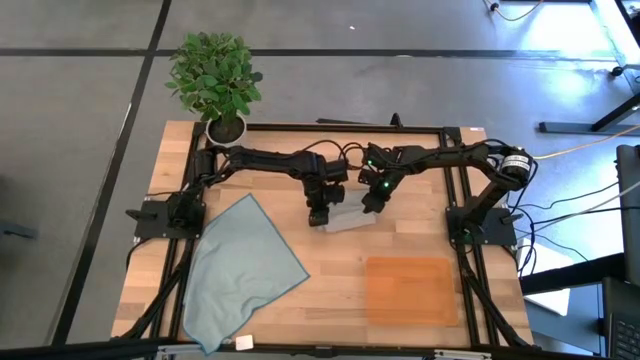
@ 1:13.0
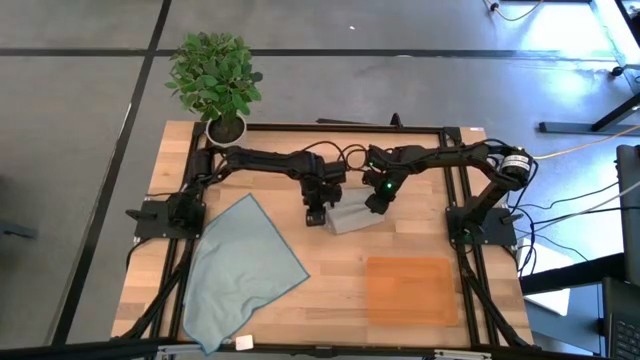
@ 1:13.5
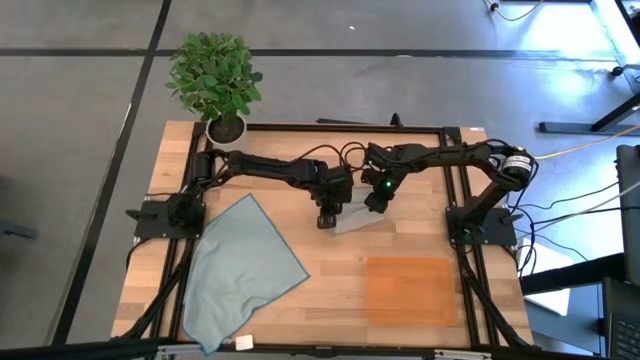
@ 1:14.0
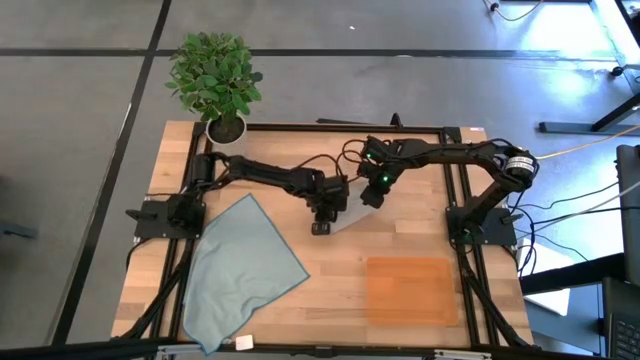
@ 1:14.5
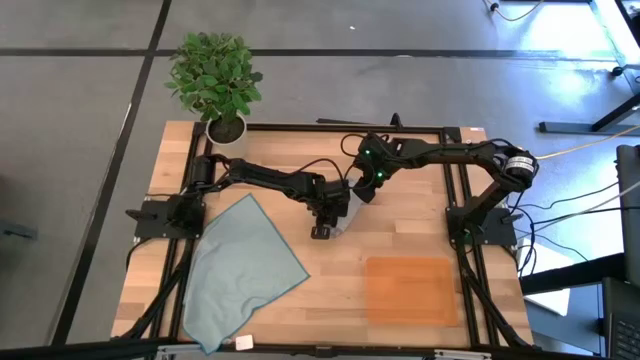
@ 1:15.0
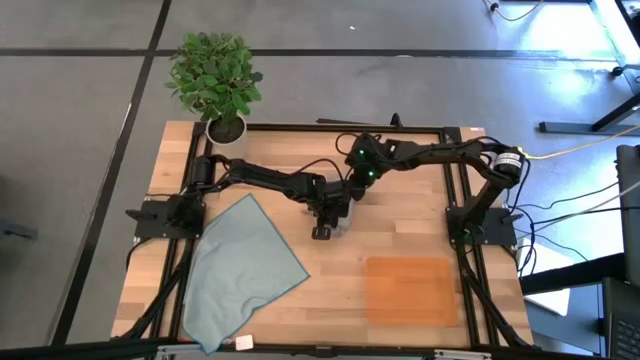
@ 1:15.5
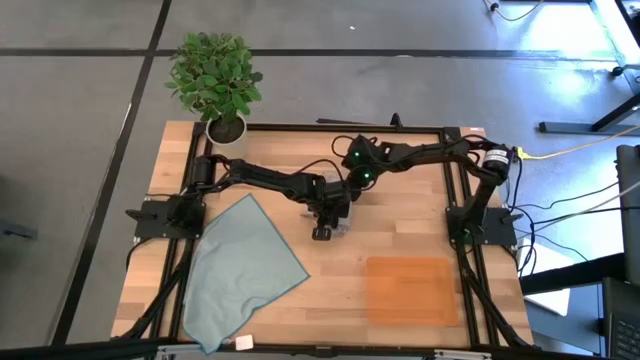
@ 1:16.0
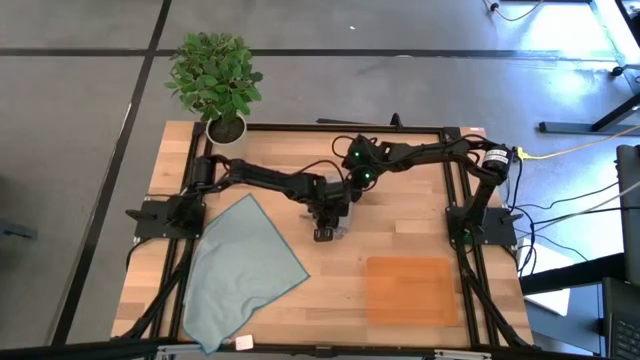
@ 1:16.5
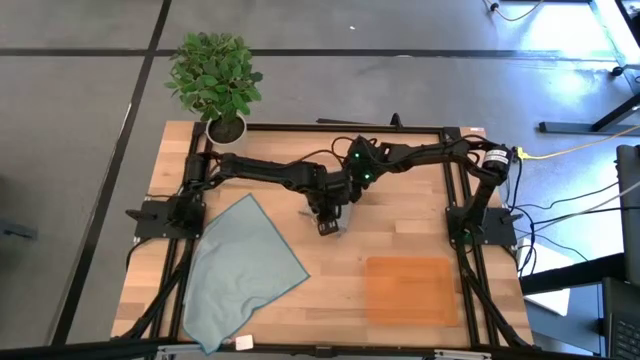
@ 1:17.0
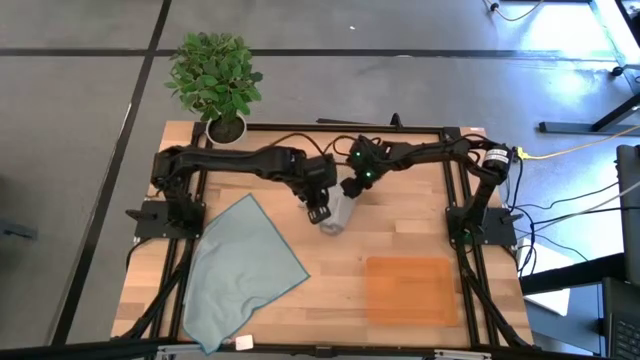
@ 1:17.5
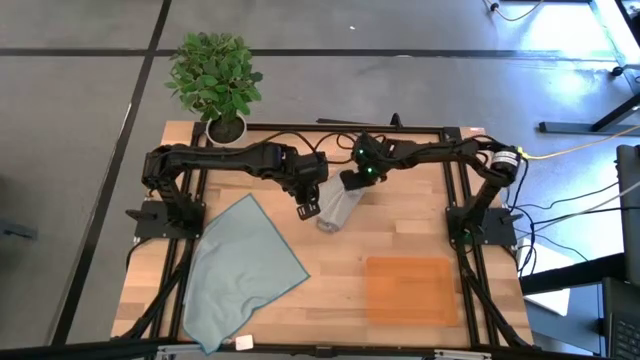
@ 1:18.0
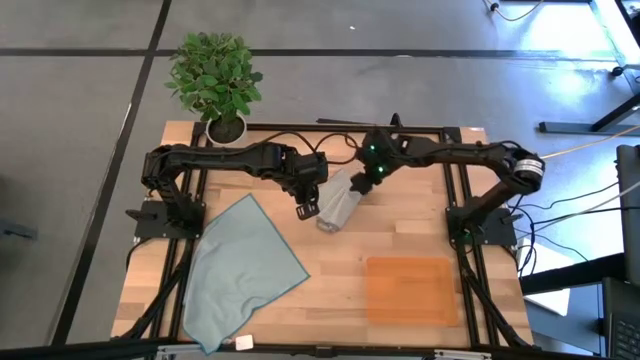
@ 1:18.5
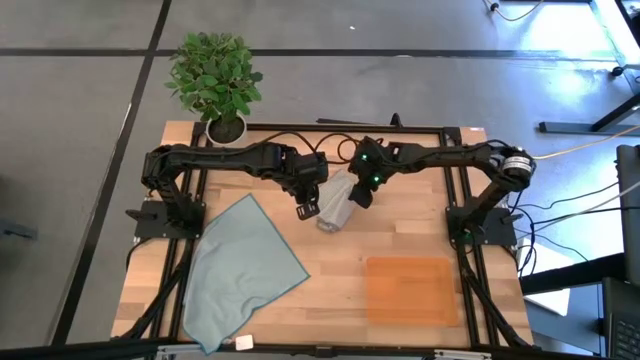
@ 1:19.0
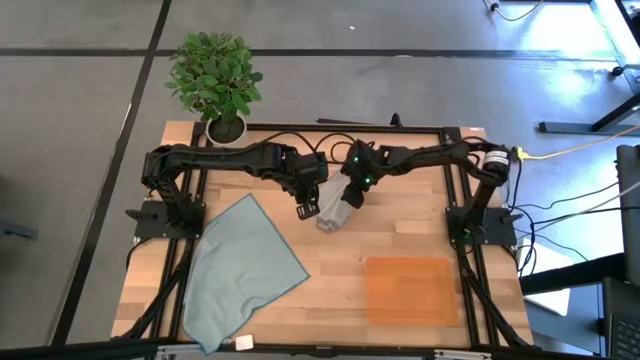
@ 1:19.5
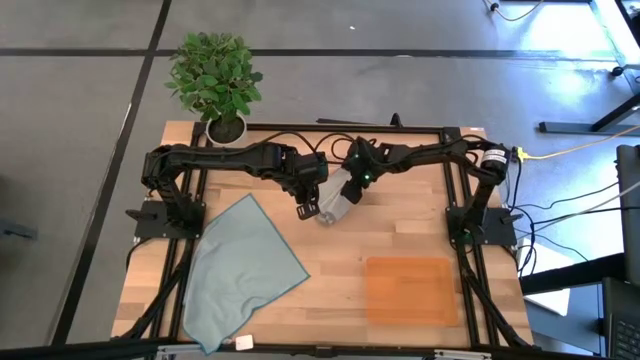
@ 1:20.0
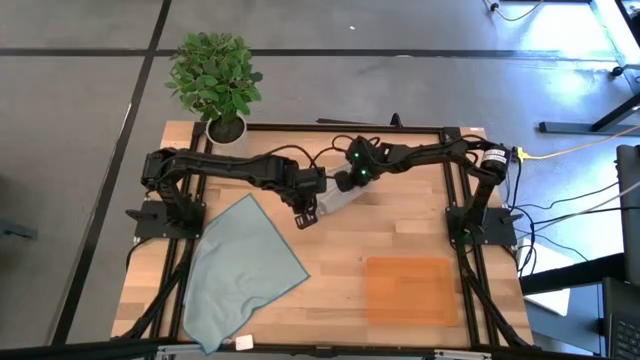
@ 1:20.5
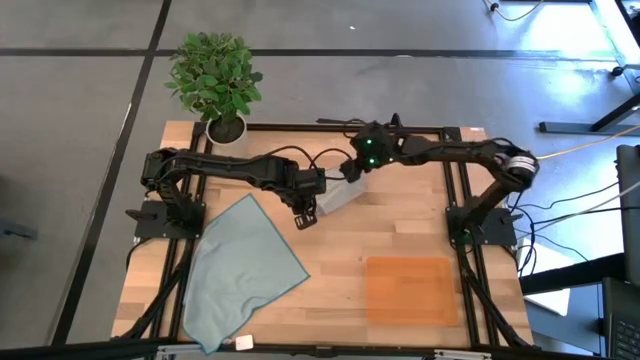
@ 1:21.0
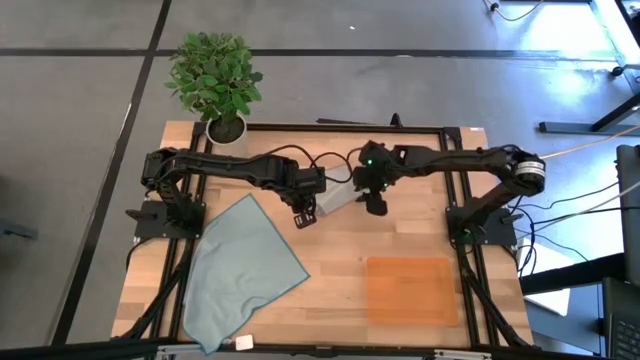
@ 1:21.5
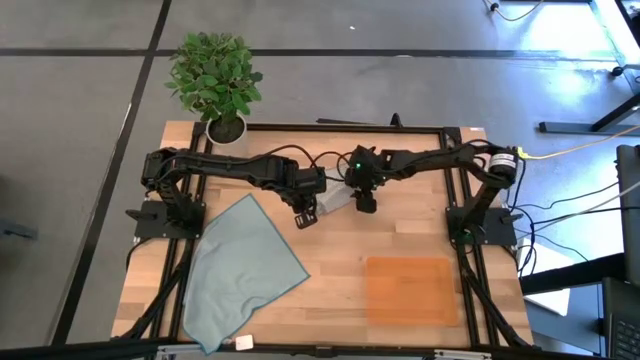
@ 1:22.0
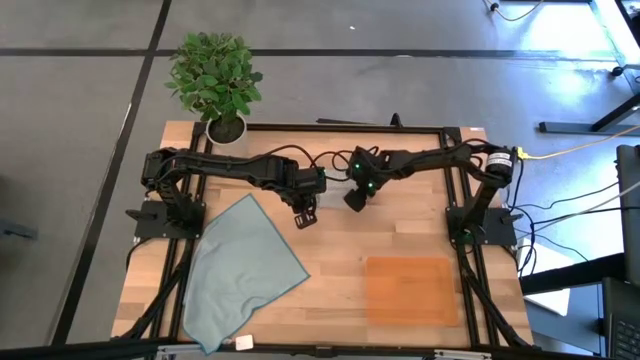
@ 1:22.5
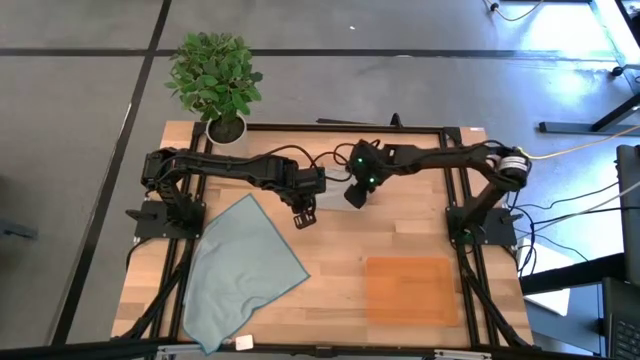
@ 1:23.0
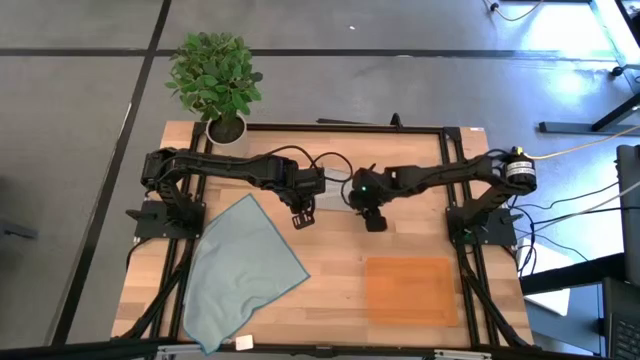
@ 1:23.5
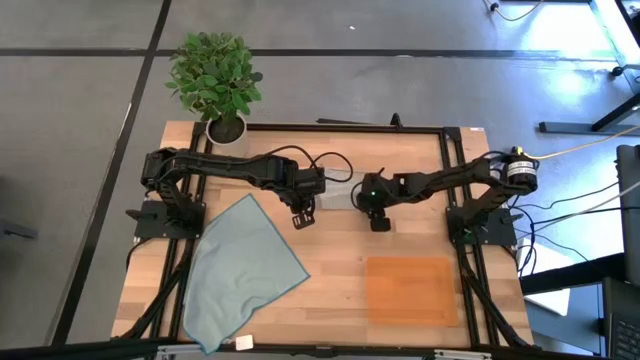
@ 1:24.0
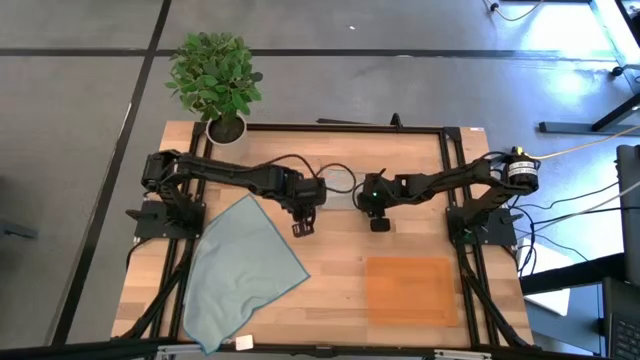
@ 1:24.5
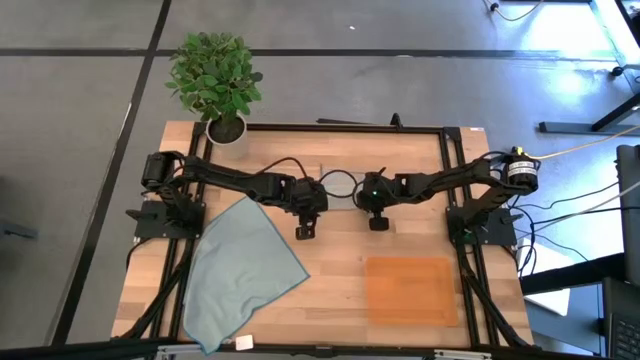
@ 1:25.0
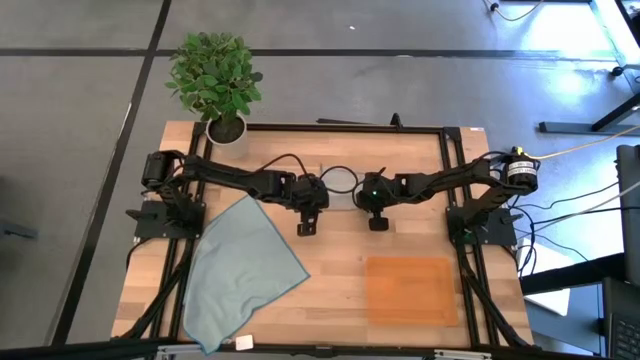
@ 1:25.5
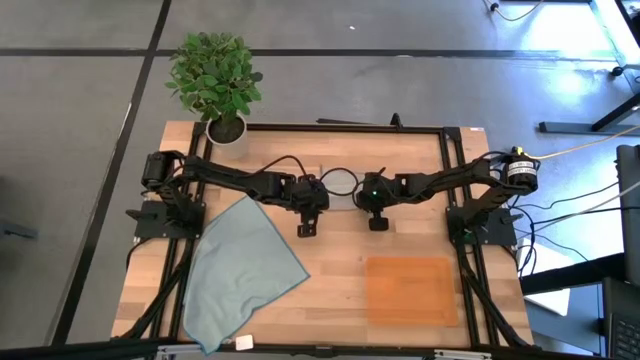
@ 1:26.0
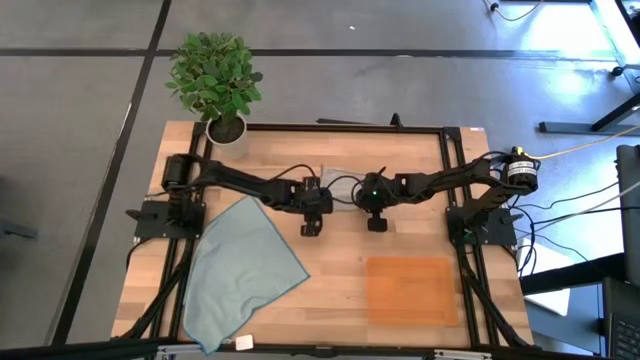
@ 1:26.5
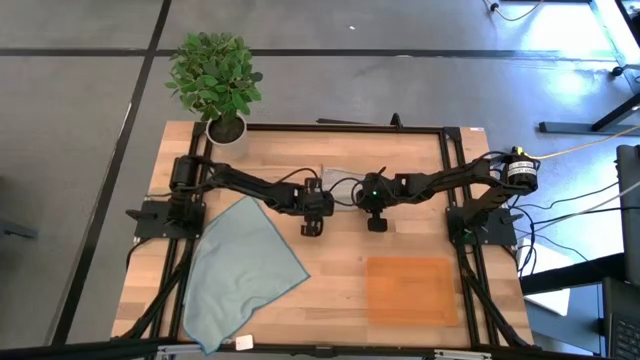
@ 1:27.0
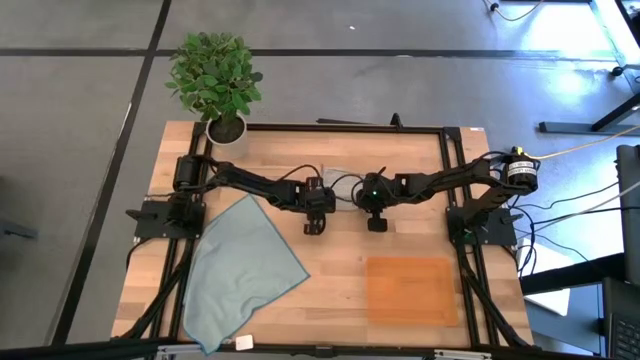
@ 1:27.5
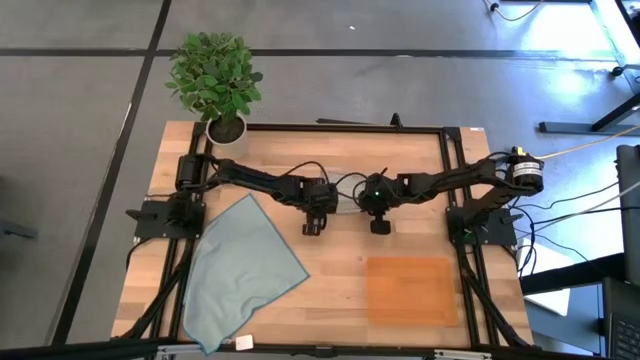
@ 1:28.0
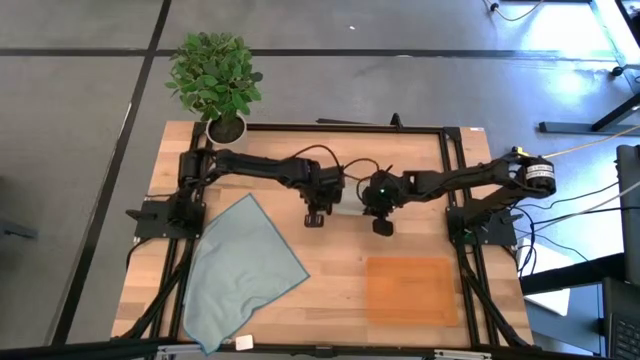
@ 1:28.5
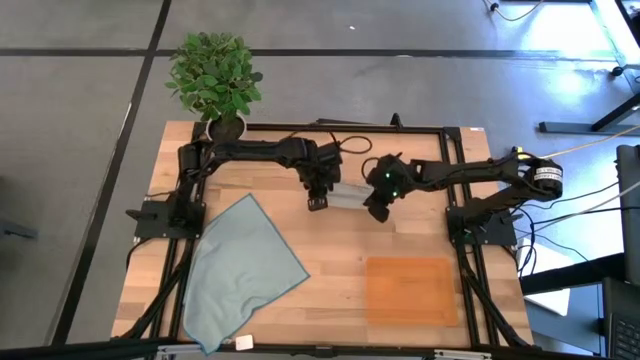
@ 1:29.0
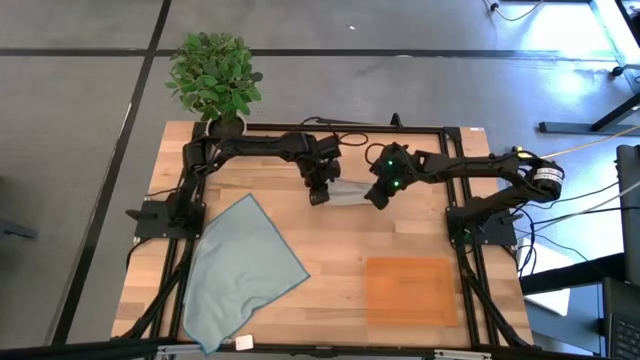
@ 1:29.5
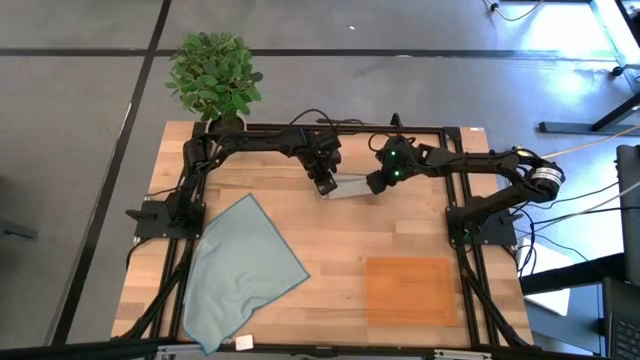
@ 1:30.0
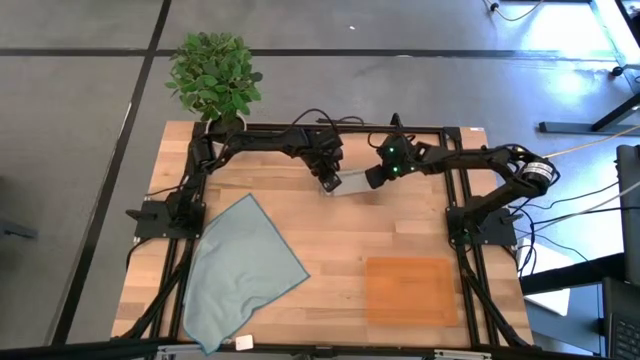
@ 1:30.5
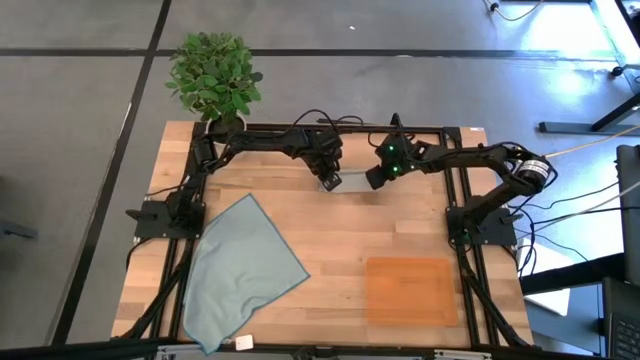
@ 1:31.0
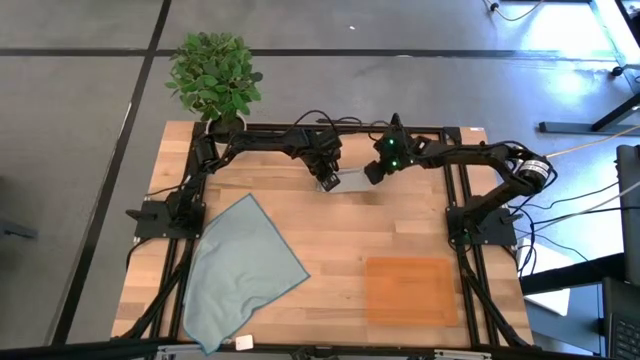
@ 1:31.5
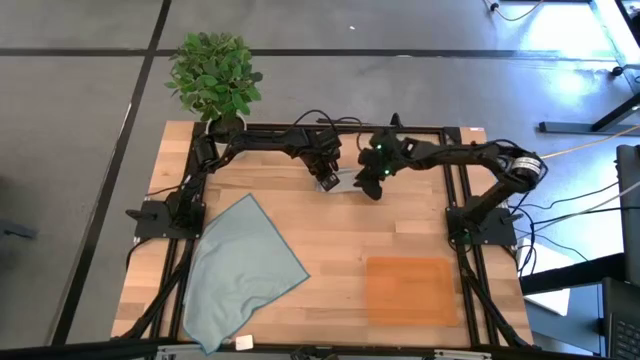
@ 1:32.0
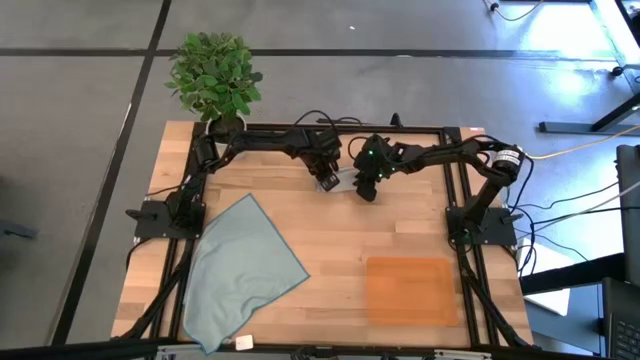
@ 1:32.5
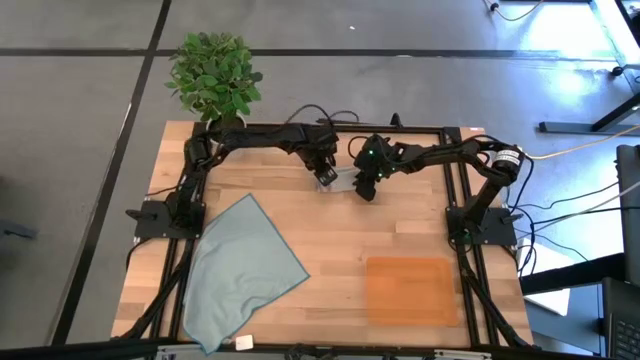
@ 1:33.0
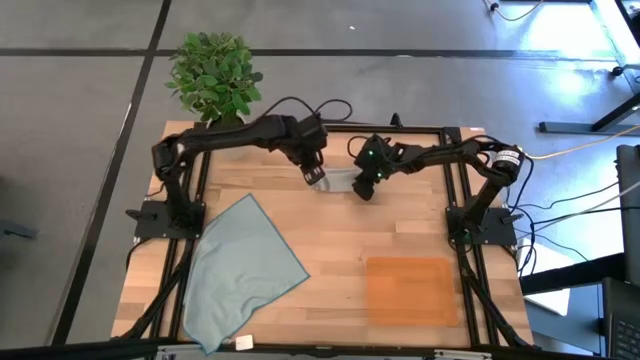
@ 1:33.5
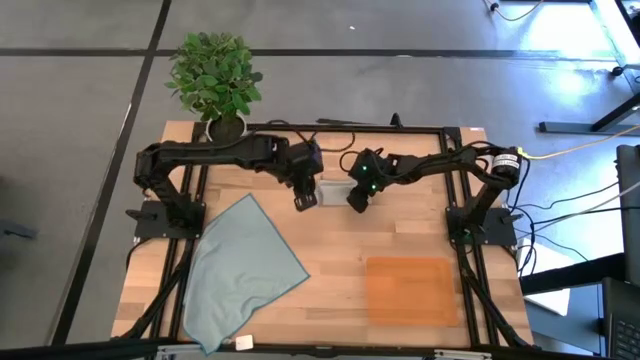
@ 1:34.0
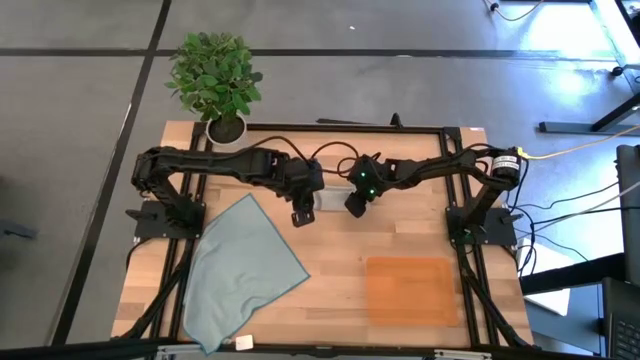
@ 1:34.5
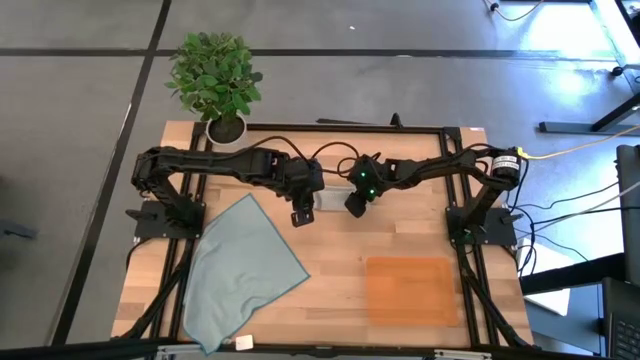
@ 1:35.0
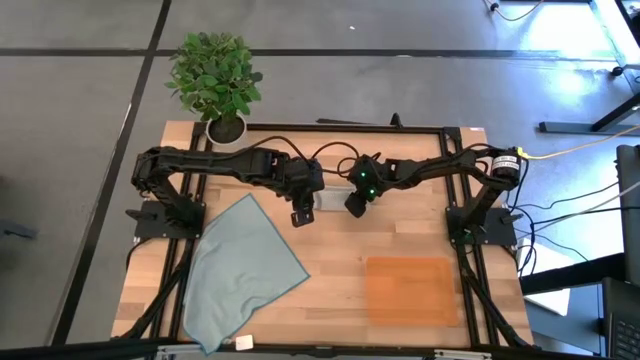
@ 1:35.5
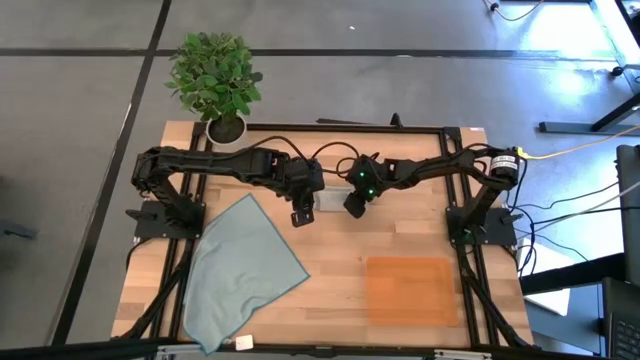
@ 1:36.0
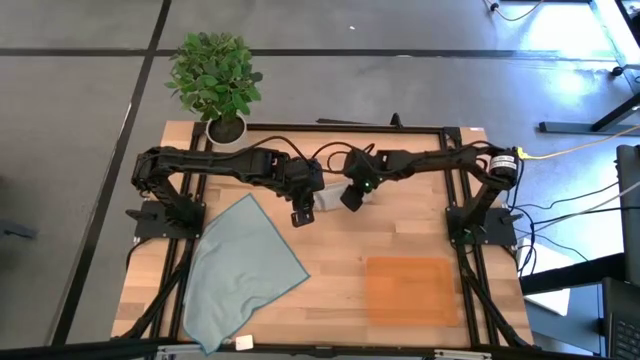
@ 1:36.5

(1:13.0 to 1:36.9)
Task: Roll microfiber towels into tight, uniform cylinder then place into a basket
Roll the gray microfiber towel
